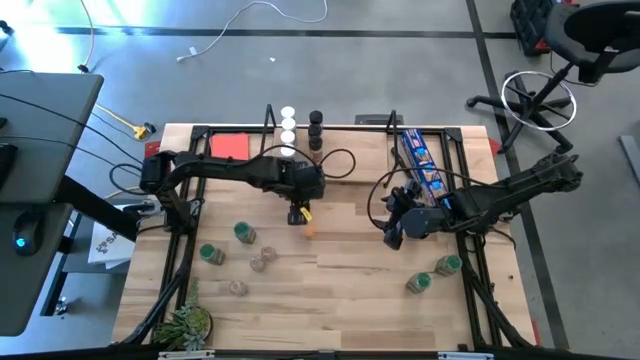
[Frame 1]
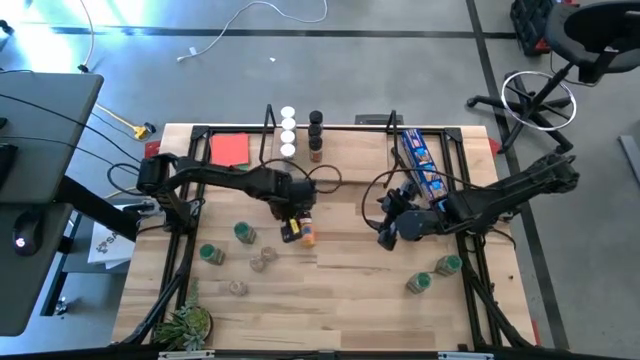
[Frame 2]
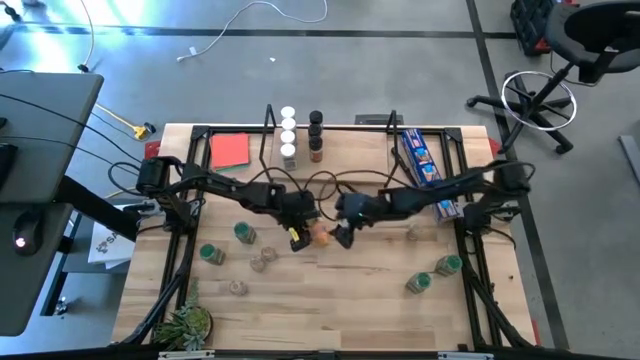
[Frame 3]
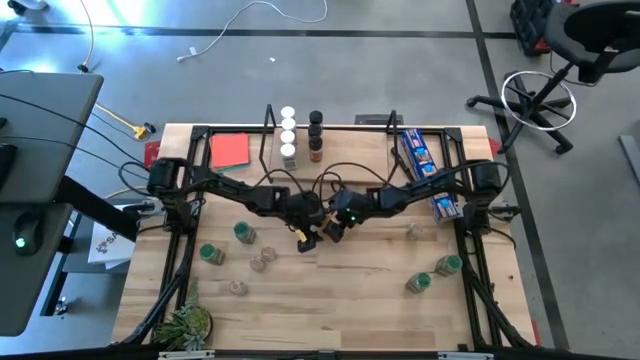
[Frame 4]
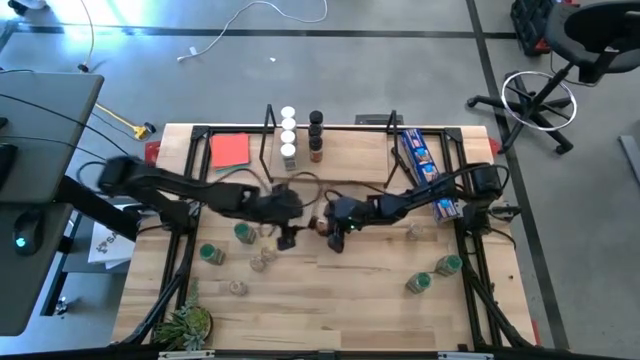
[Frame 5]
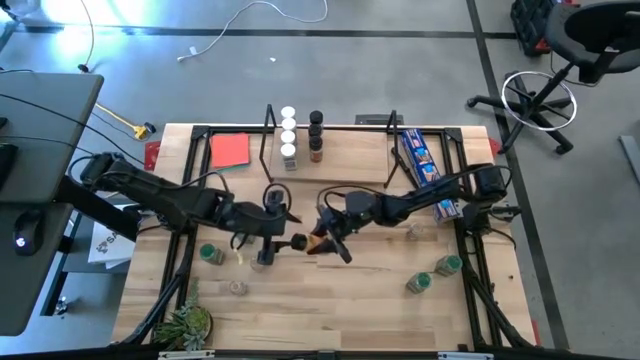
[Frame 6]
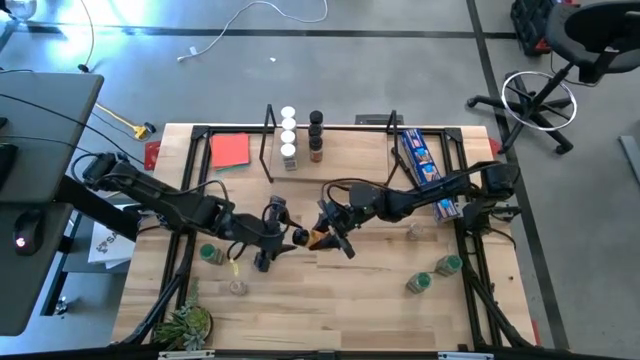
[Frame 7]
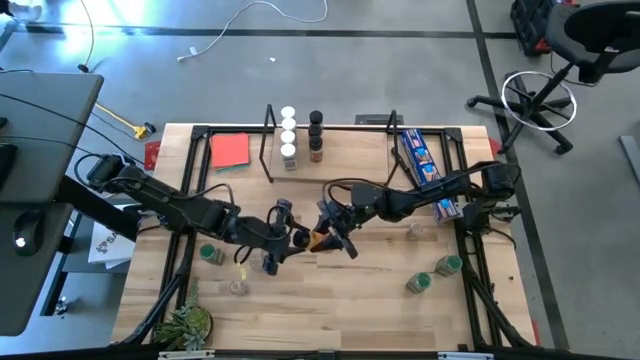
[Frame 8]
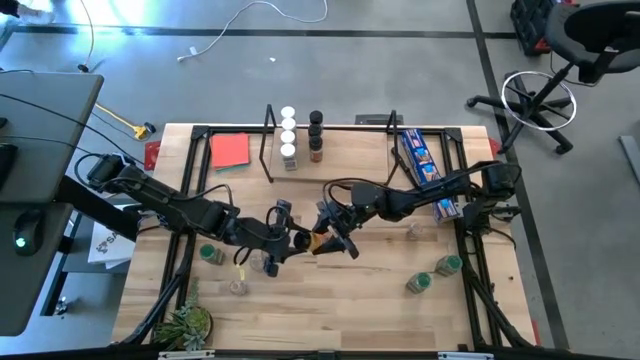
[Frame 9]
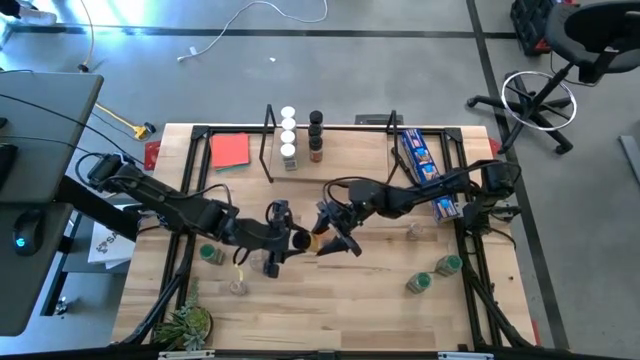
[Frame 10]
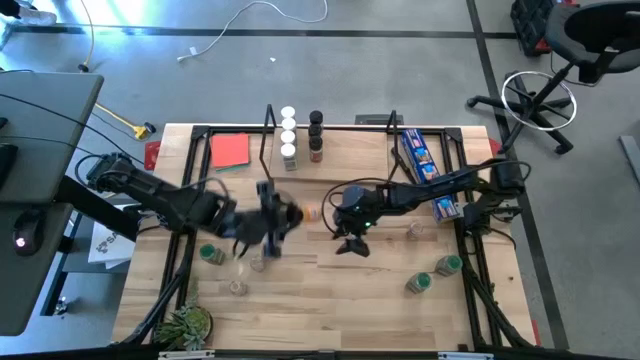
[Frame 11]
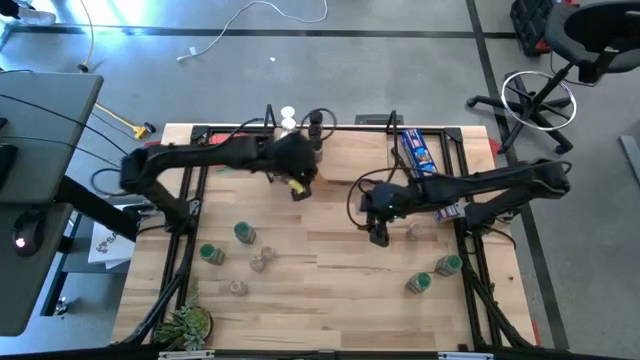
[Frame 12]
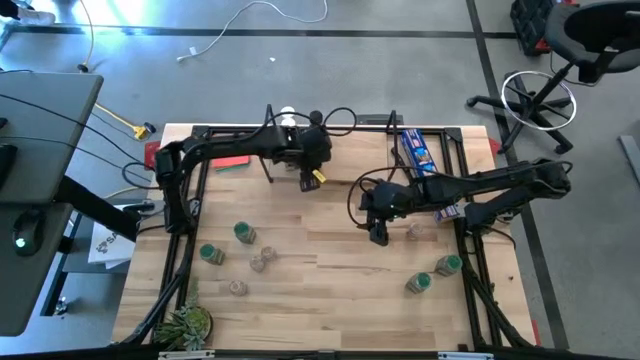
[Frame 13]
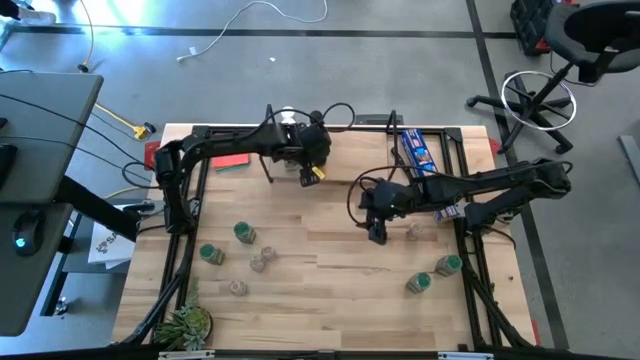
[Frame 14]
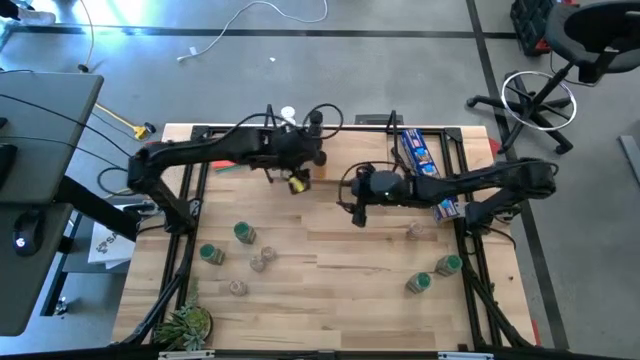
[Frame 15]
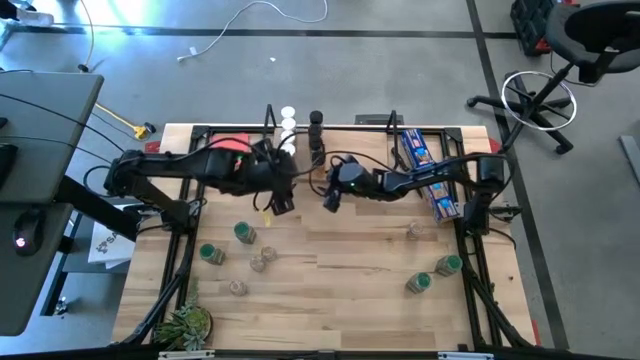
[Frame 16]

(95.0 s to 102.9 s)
Task: Shelf spices
Put the black seasoning bottle on the shelf aligned with the other black seasoning bottles

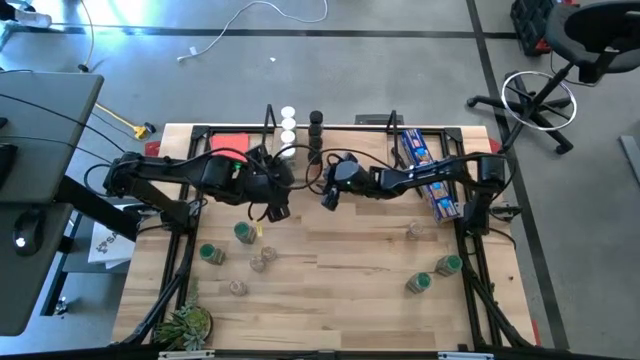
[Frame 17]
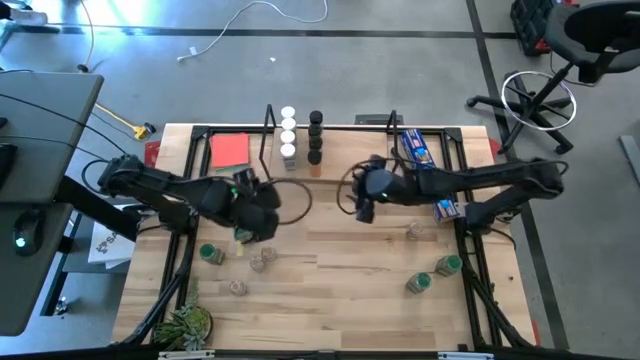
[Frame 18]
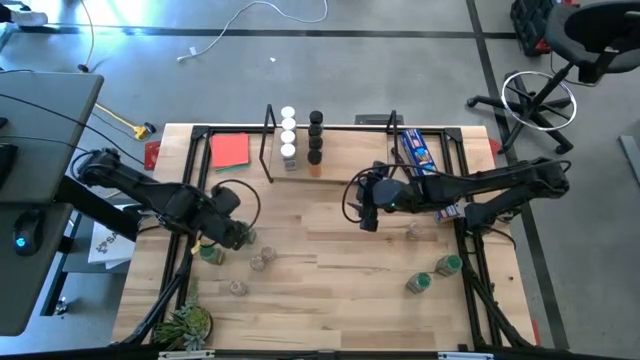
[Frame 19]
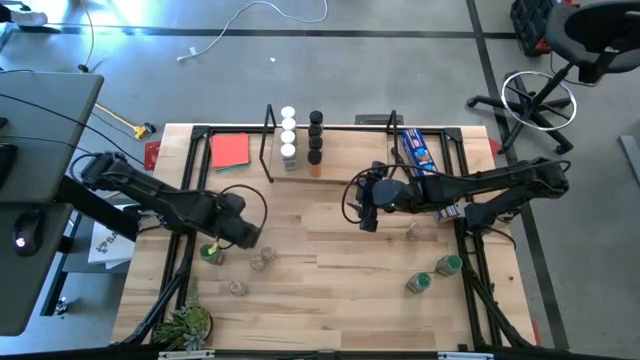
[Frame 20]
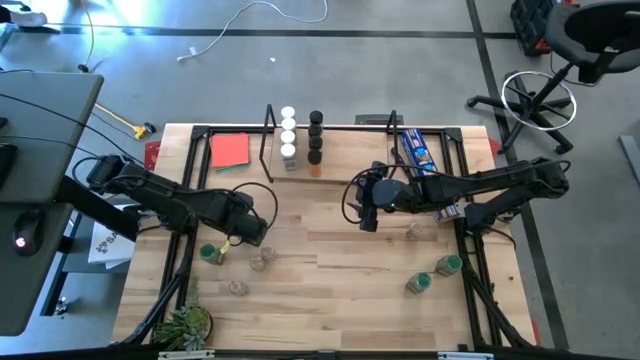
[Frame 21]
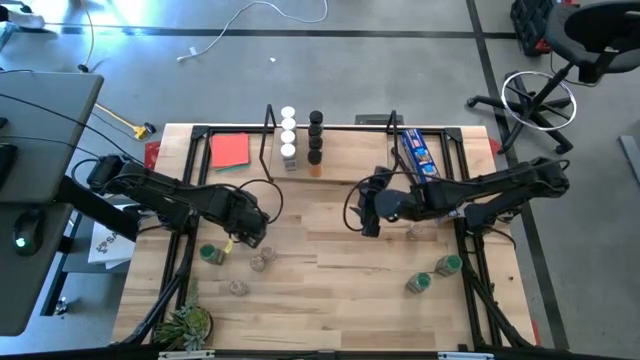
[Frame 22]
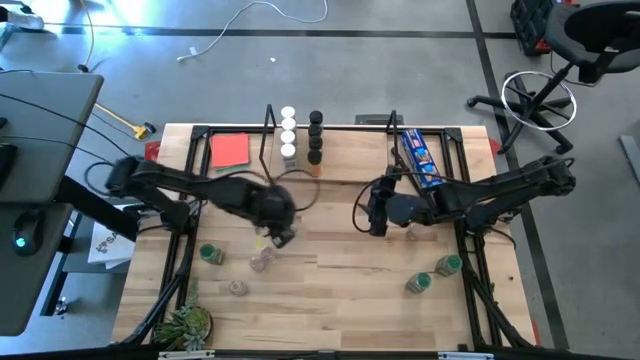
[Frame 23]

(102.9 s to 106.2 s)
Put the green seasoning bottle on the shelf

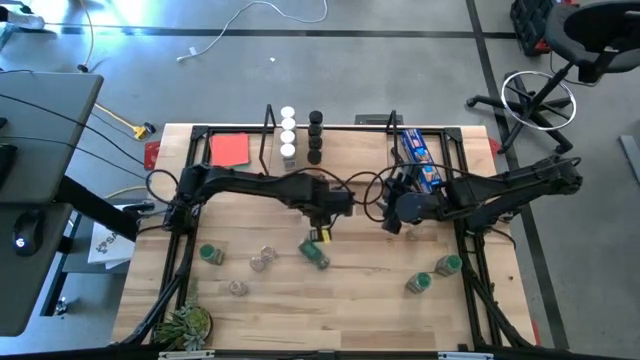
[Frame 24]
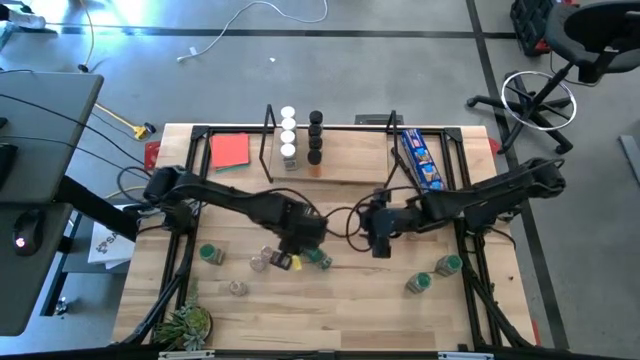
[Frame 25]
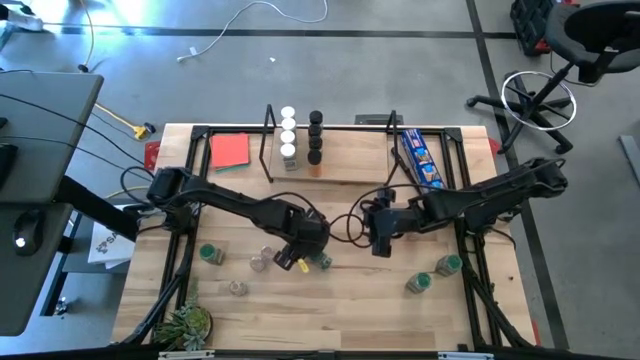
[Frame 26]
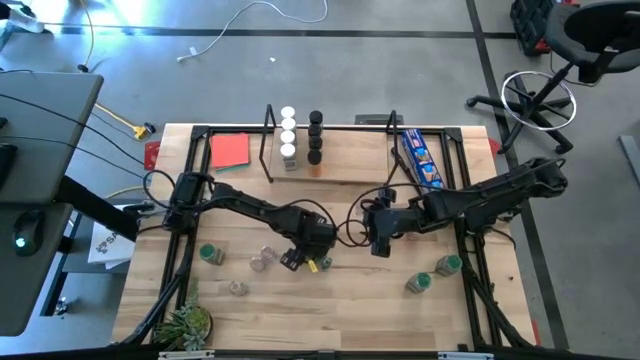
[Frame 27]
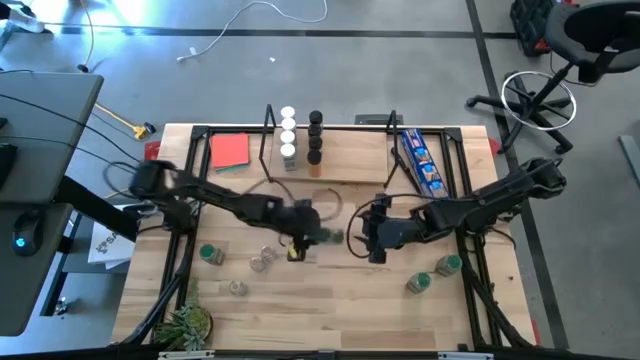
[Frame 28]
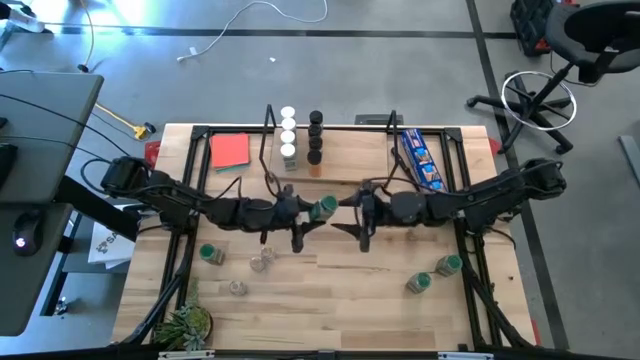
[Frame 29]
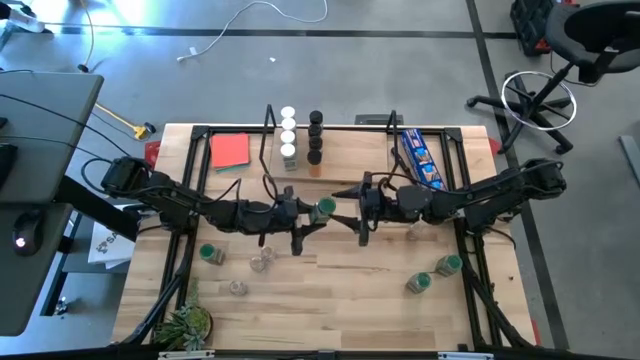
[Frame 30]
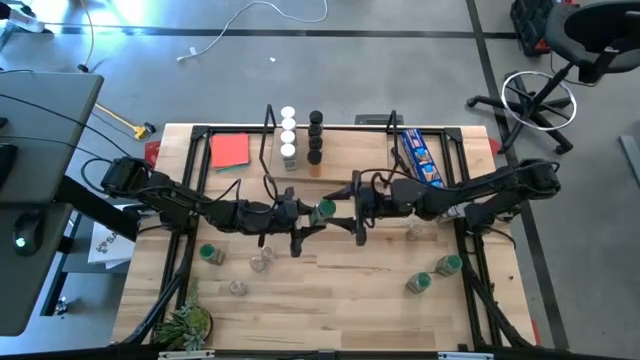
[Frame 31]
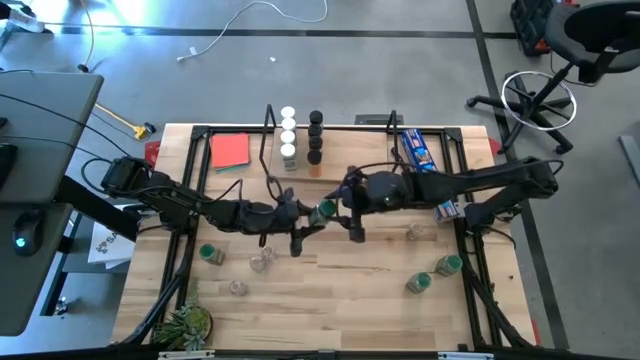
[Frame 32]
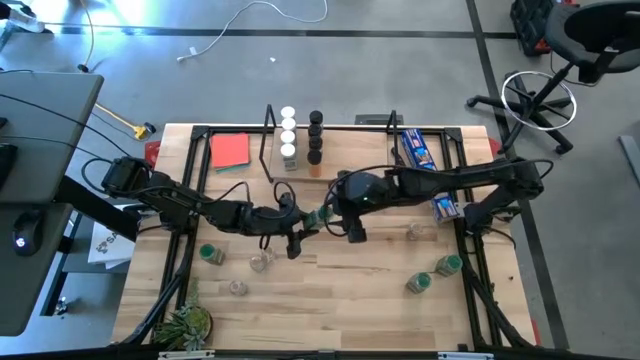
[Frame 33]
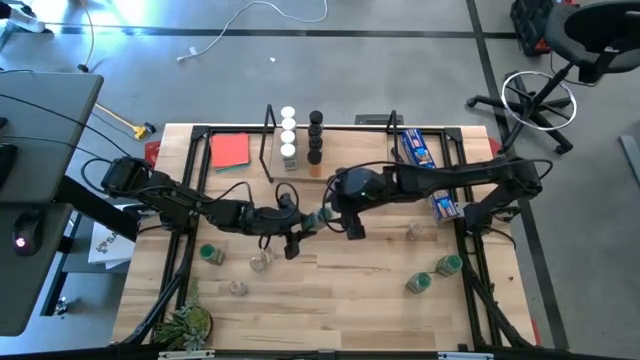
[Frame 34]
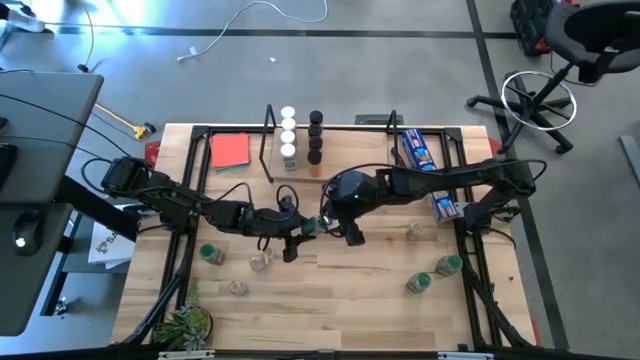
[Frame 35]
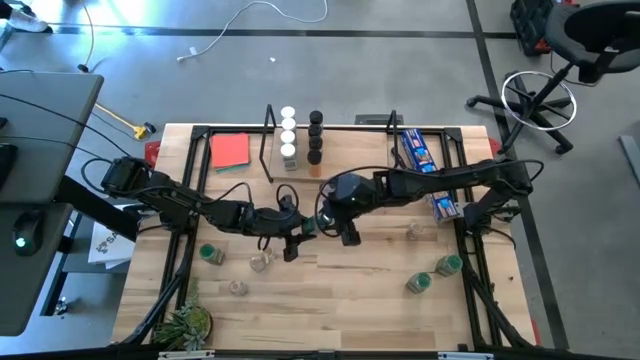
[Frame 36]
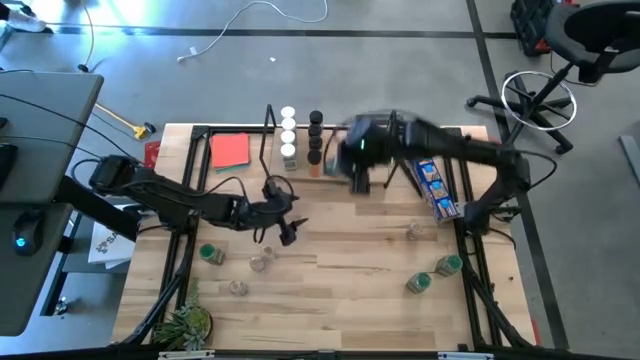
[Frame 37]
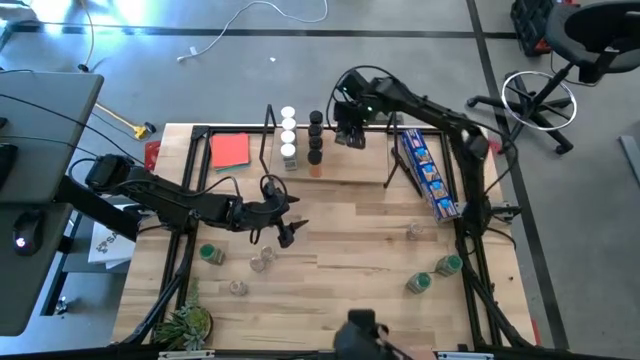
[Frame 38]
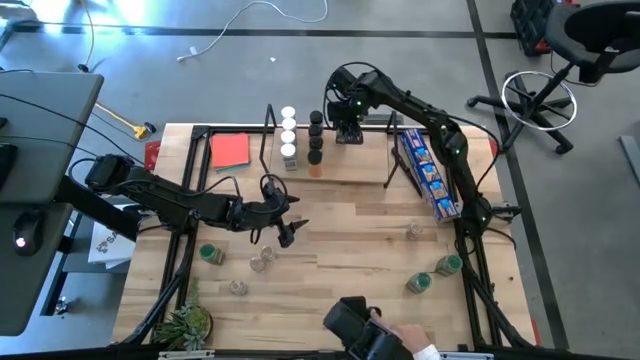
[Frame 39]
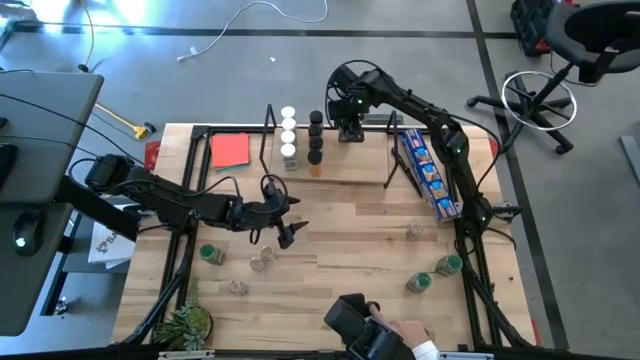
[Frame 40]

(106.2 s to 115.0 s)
Put the green seasoning bottle on the shelf

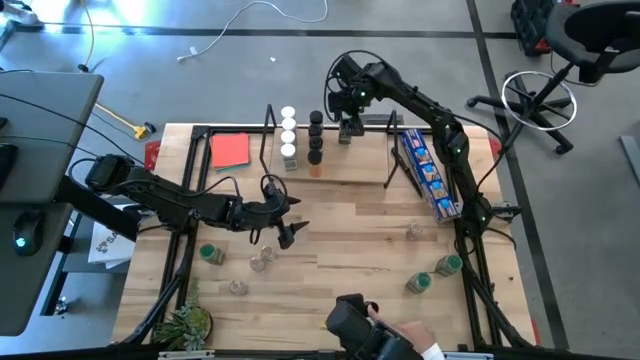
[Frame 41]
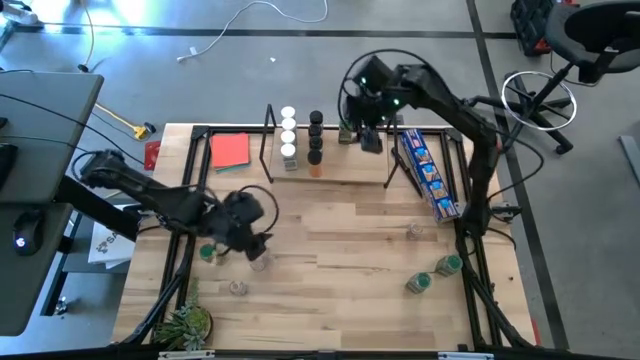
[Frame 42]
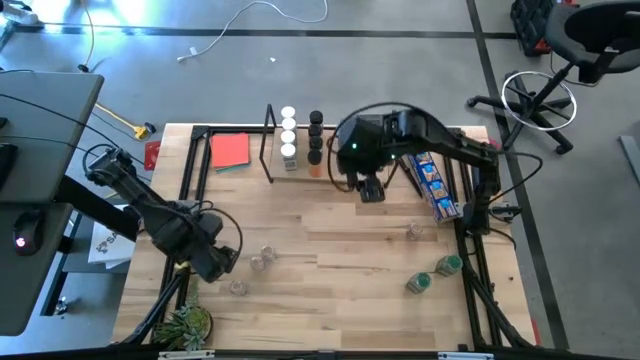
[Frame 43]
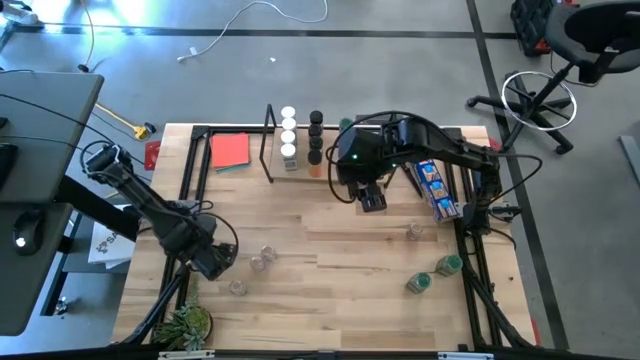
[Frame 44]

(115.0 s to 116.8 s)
Put the green seasoning bottle on the shelf aligned with the other green seasoning bottle
